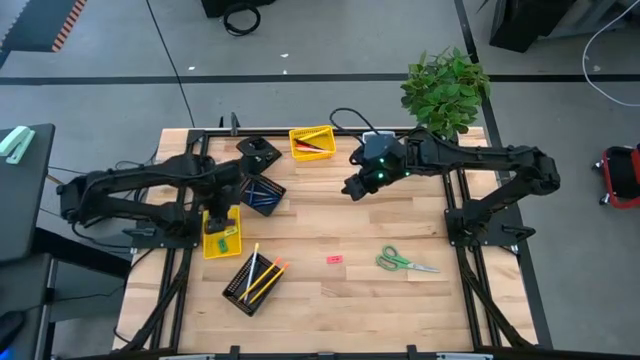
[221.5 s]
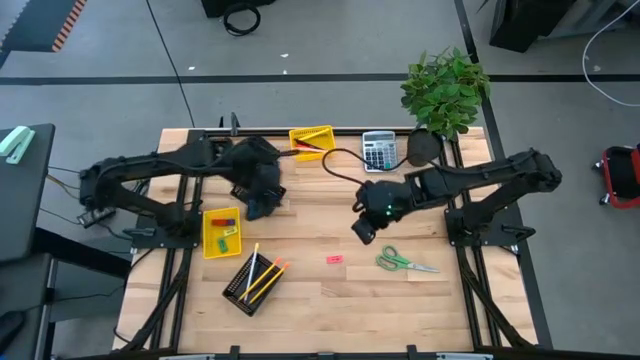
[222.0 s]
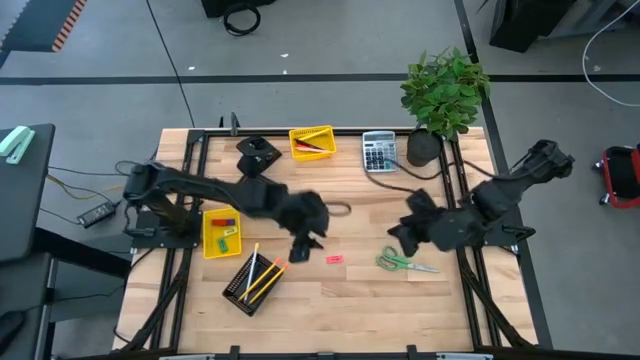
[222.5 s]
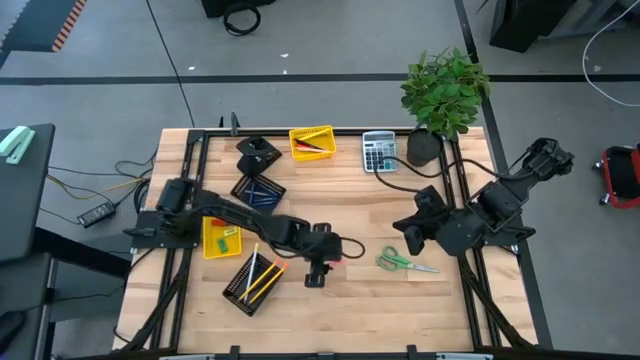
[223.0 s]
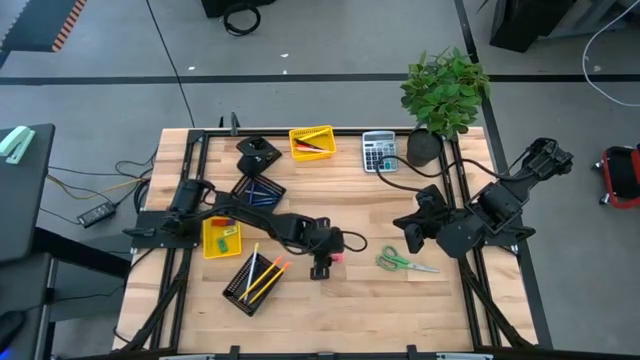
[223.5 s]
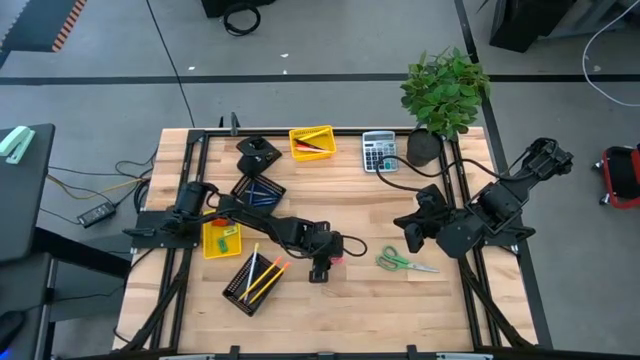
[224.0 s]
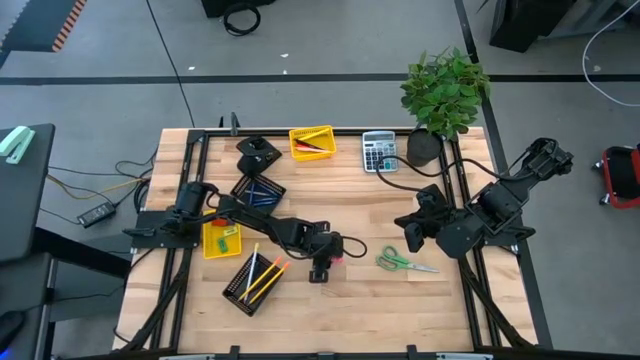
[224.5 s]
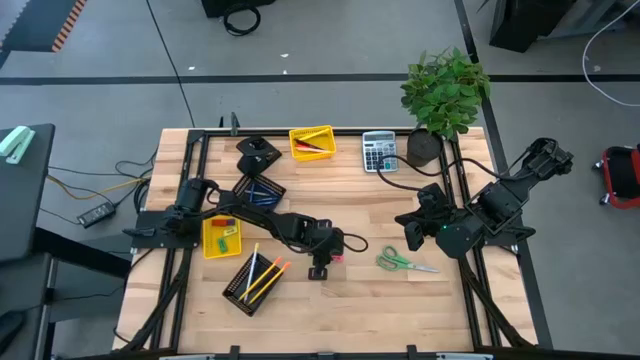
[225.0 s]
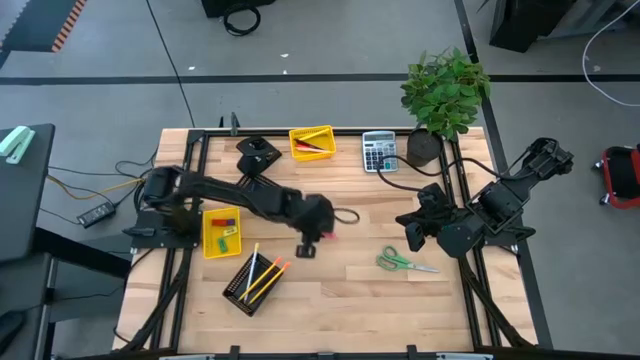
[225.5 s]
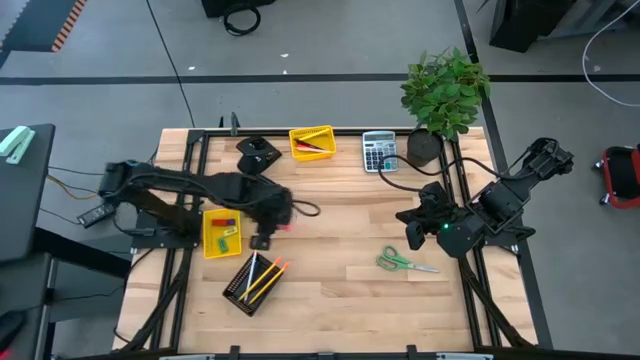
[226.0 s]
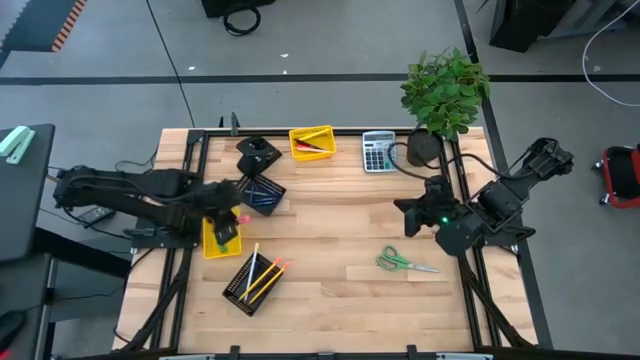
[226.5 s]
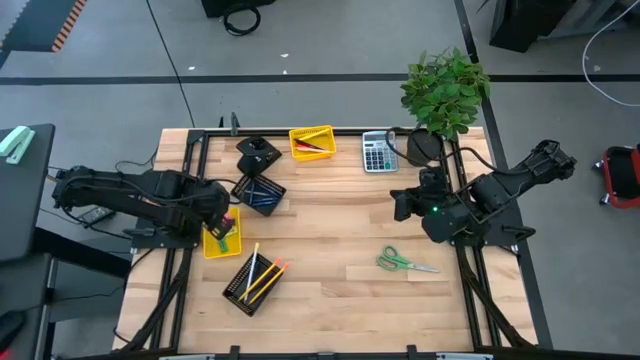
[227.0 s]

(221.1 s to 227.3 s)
Task: Sort crayons/erasers/pens/pencils in bins
Put the pink eraser into the bottom yellow basket

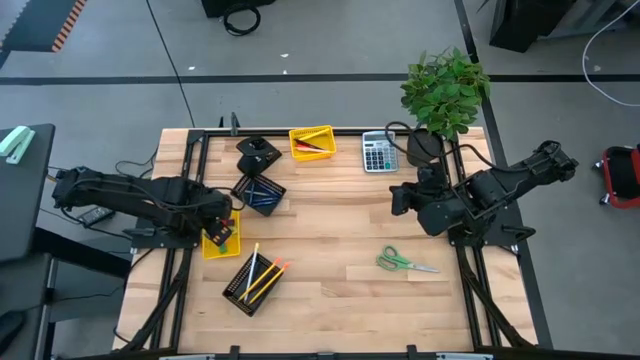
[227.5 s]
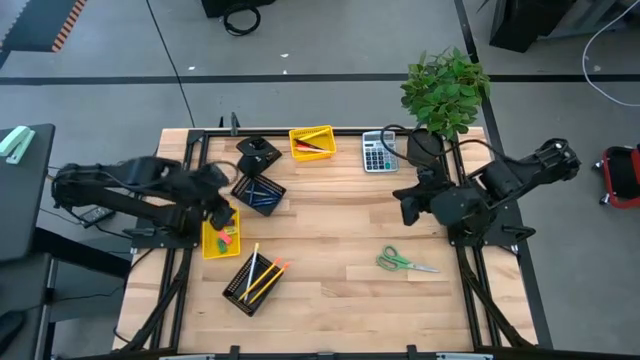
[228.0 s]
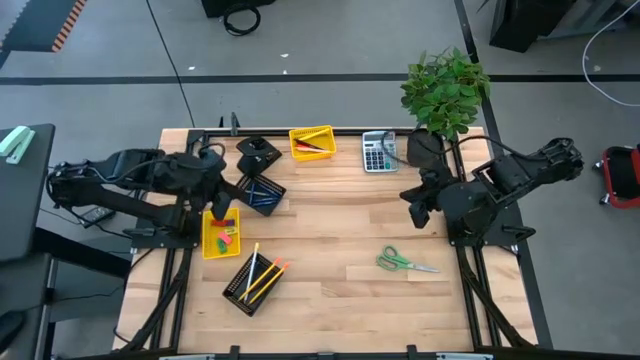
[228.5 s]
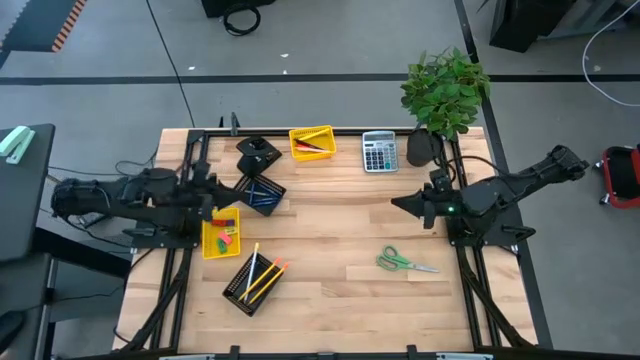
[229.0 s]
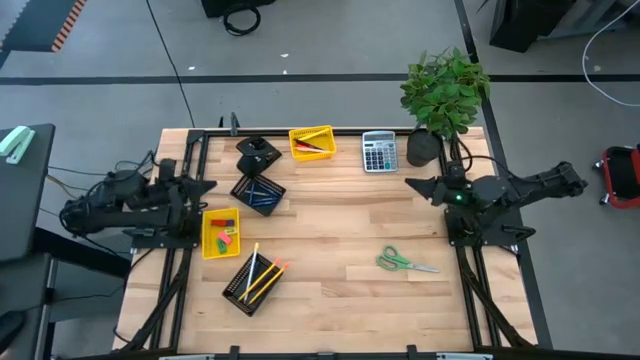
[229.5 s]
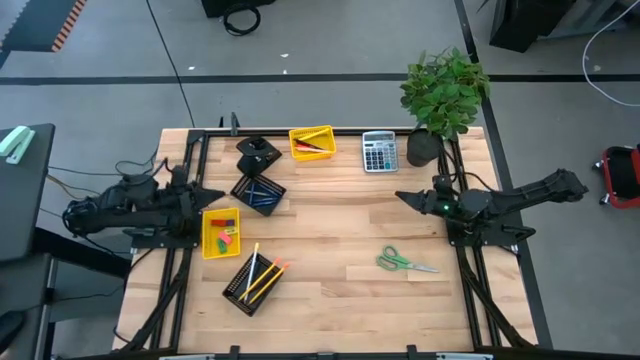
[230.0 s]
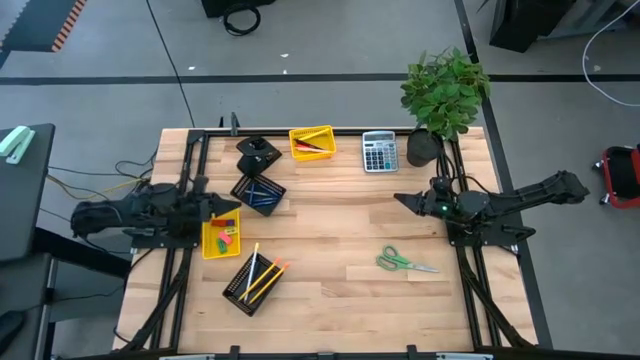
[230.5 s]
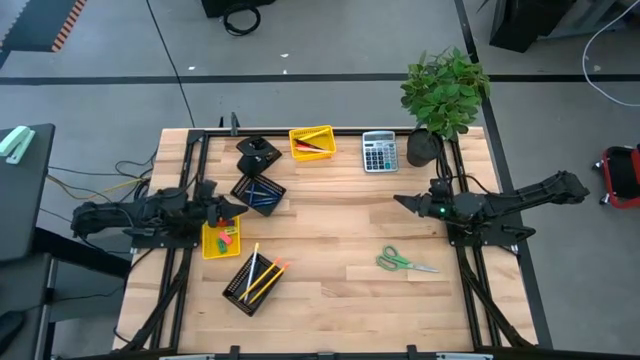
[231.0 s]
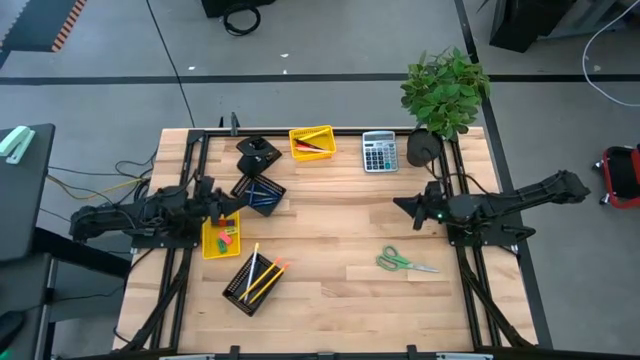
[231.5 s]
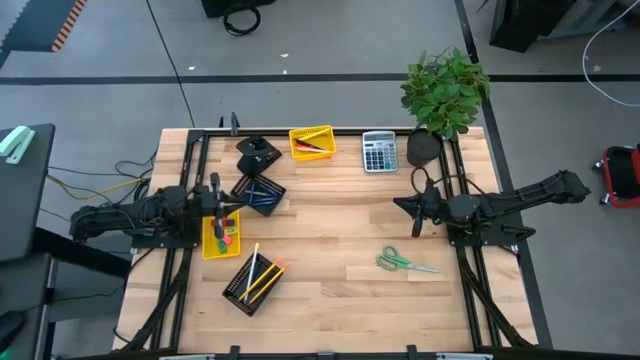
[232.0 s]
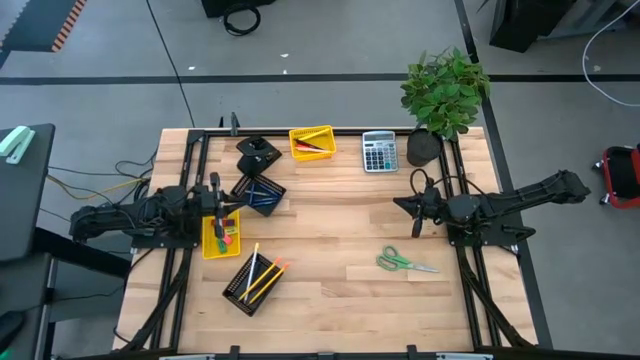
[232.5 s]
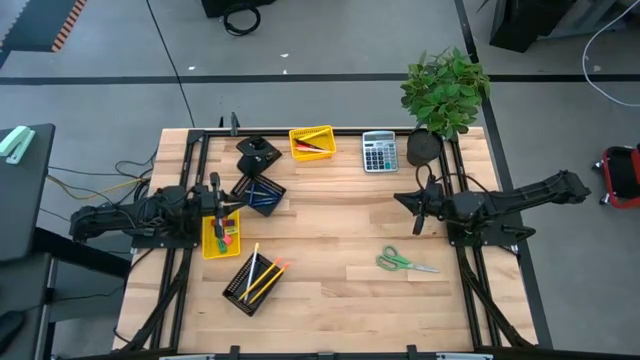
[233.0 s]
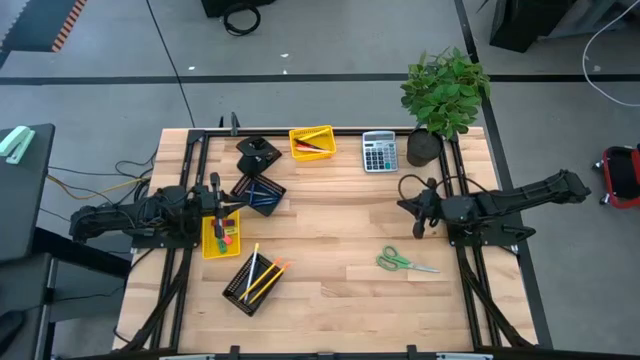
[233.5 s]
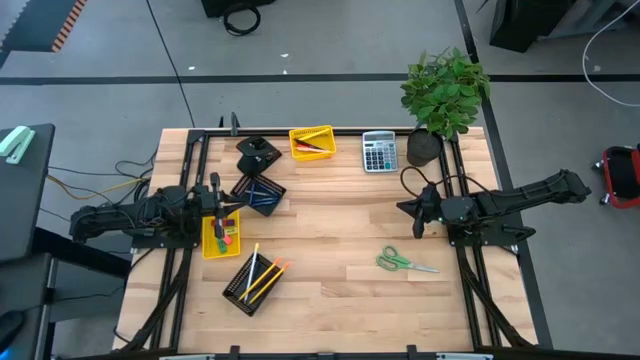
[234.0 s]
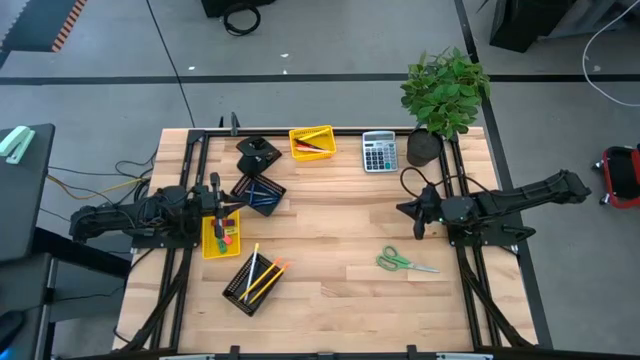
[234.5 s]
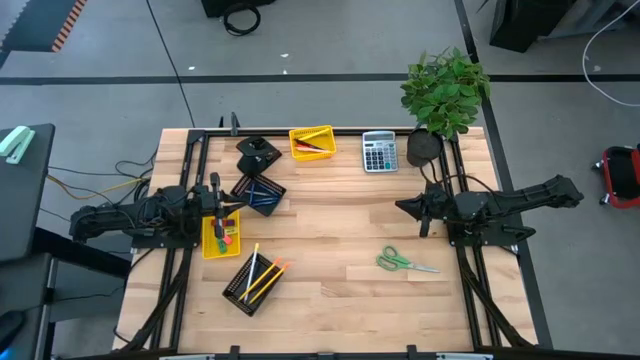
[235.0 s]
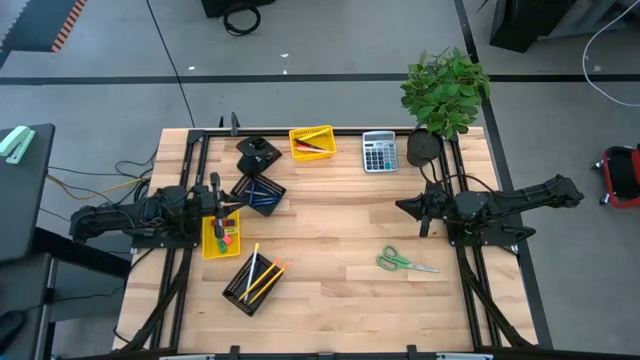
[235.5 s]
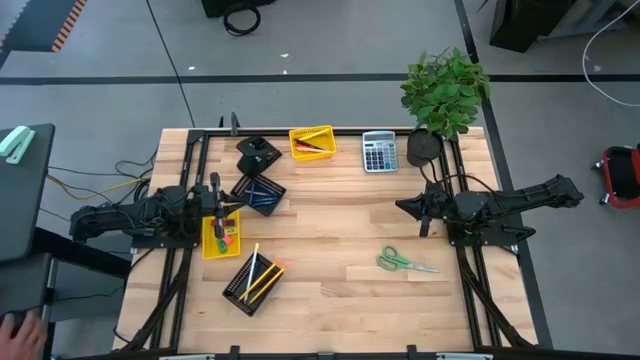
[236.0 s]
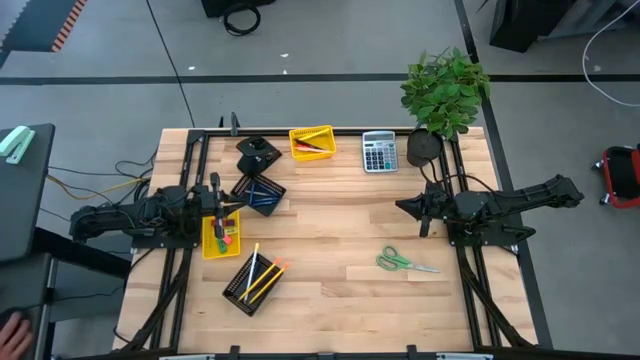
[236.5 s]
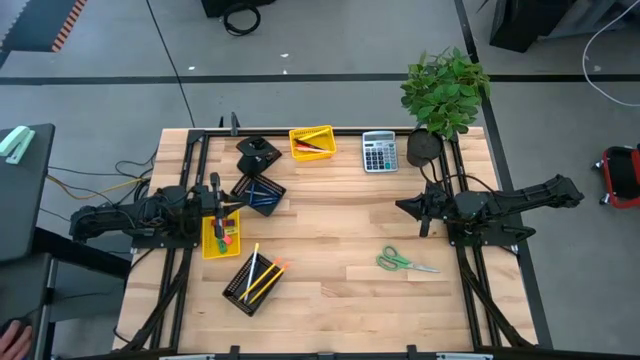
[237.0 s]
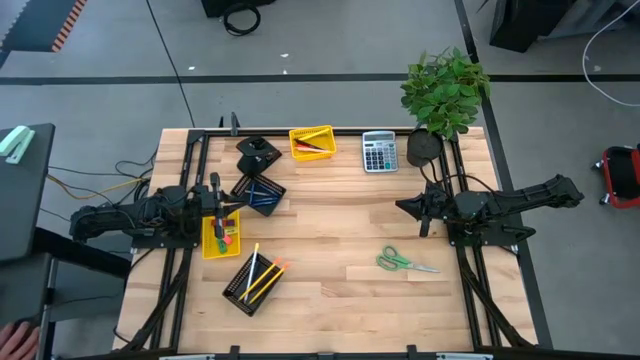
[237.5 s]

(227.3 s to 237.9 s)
Return to Home Position

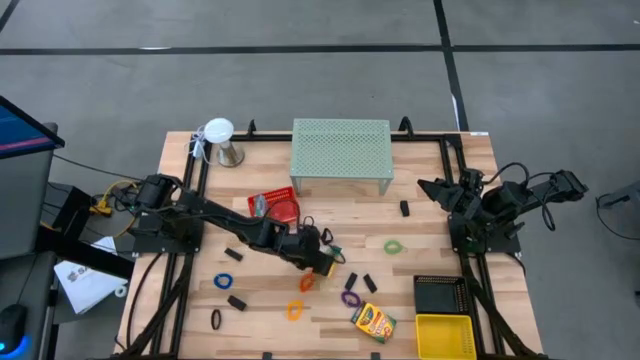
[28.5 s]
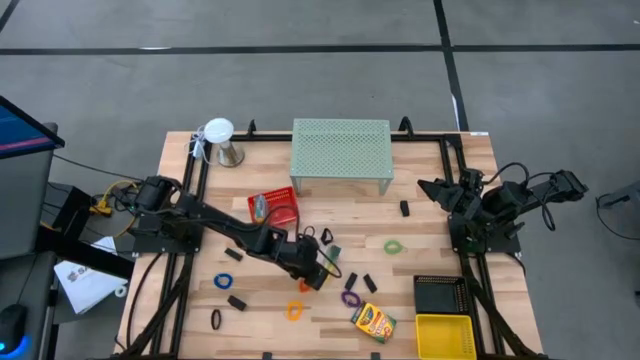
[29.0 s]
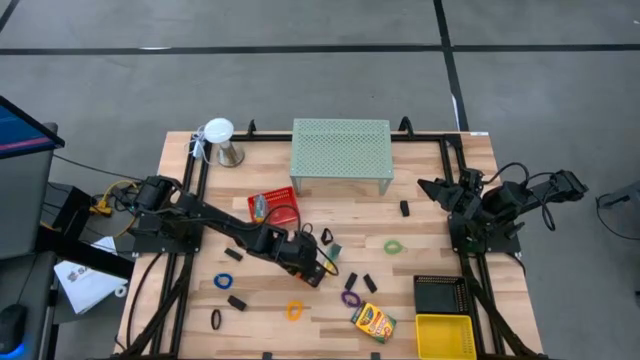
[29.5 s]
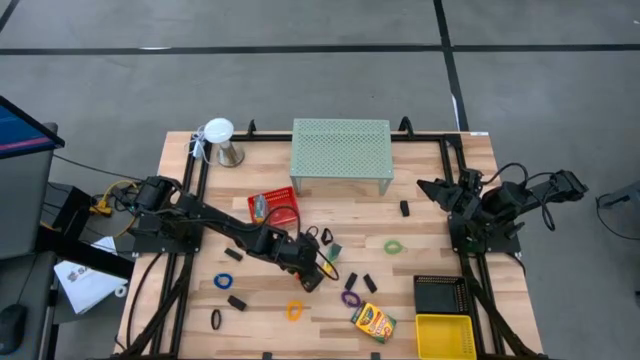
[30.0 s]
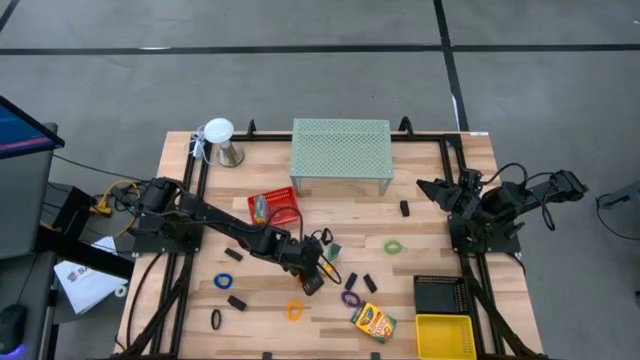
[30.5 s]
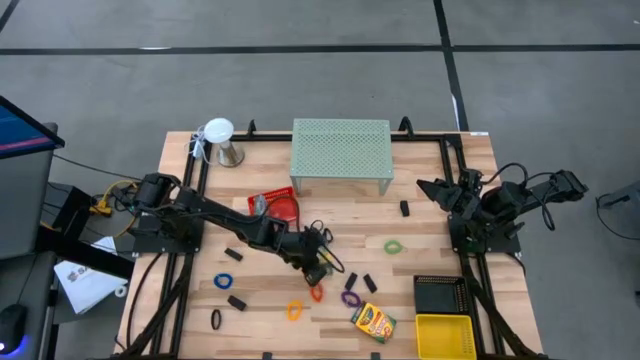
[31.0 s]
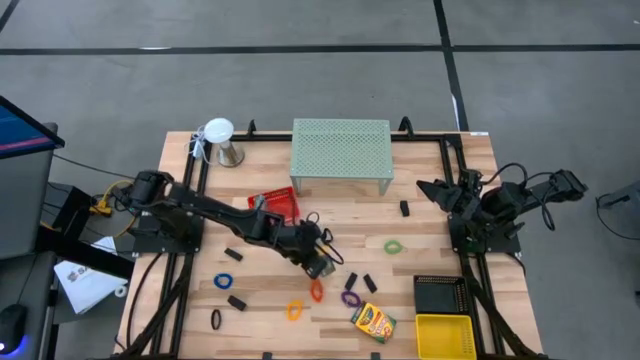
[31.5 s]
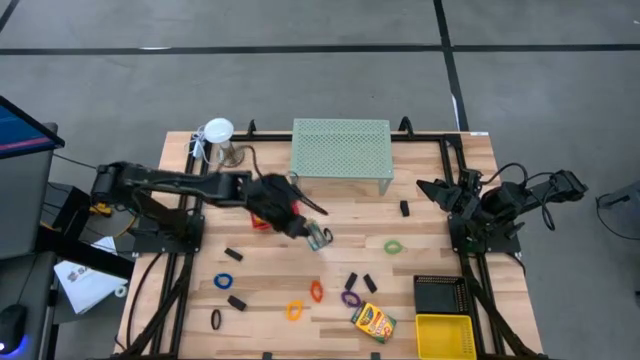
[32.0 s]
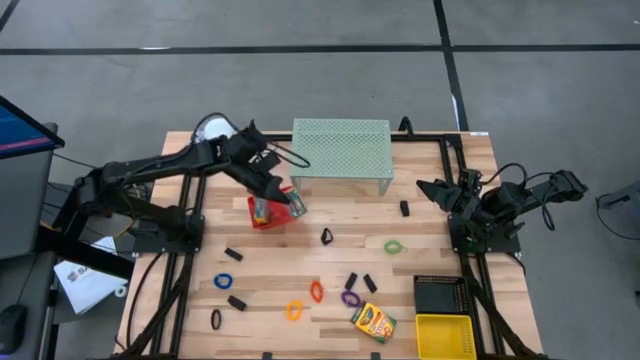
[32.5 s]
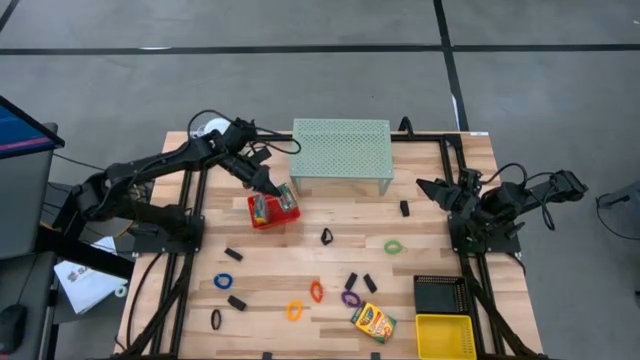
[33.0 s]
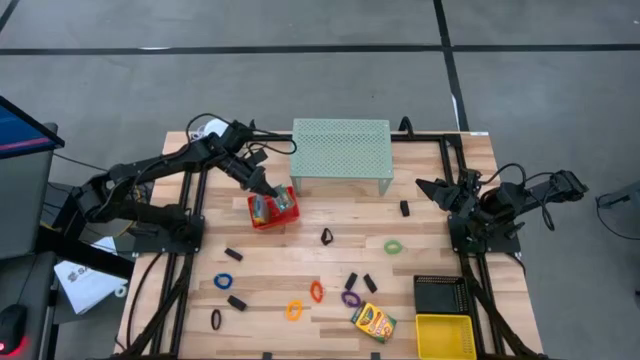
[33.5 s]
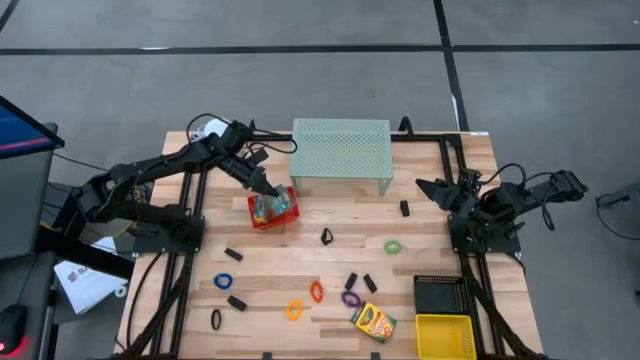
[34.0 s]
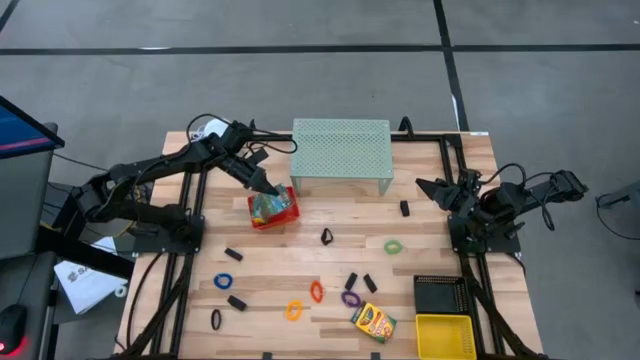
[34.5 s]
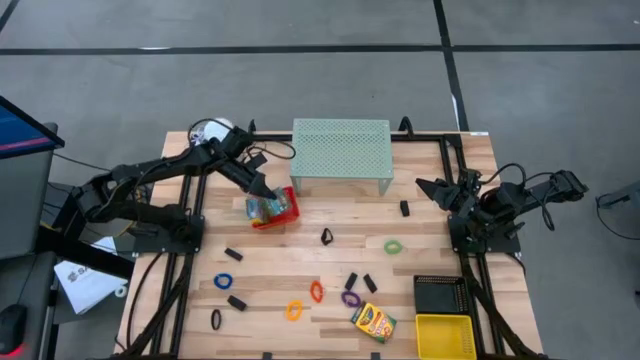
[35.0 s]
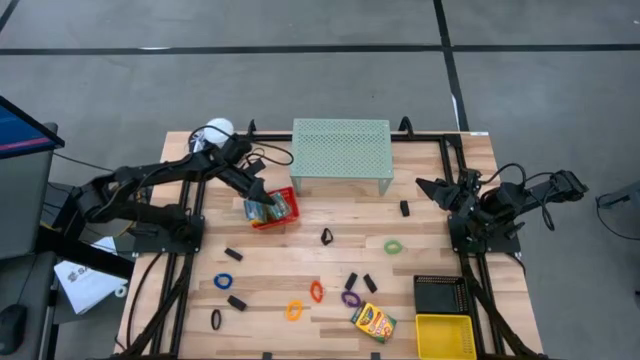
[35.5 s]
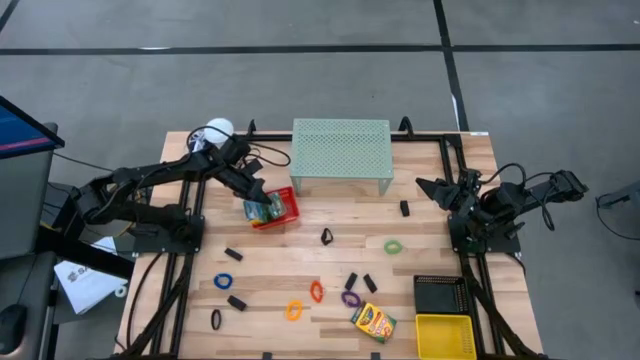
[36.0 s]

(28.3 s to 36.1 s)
Task: Pick & Place Office Desk Supplies
Put the yellow crayon box into the red bin
